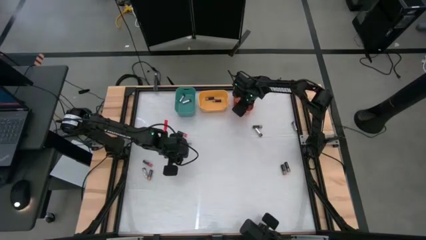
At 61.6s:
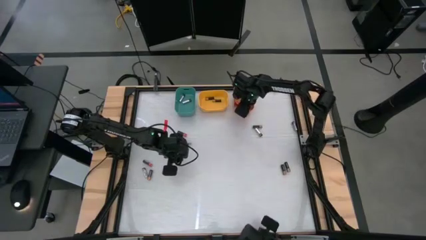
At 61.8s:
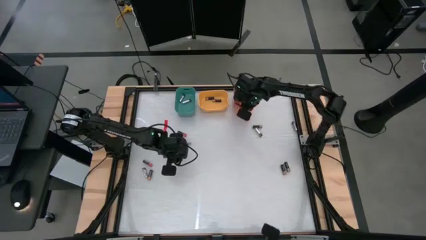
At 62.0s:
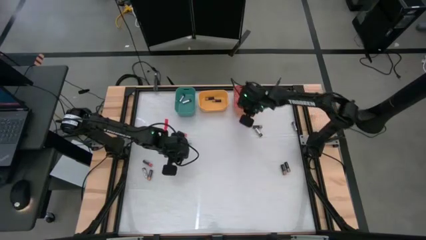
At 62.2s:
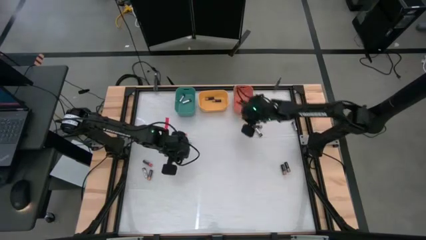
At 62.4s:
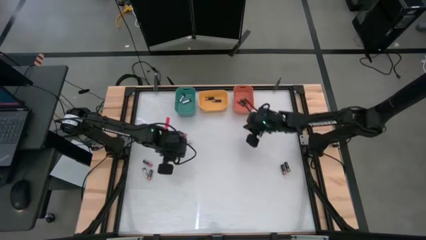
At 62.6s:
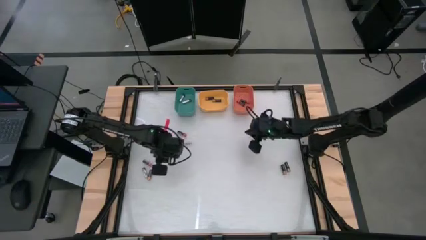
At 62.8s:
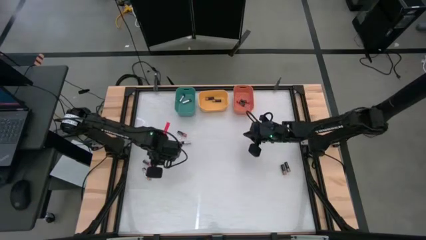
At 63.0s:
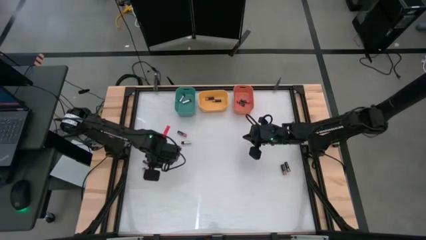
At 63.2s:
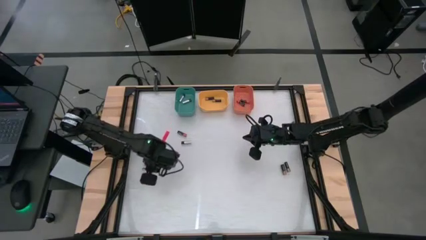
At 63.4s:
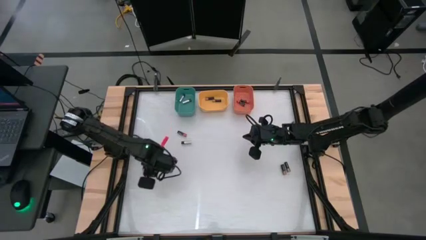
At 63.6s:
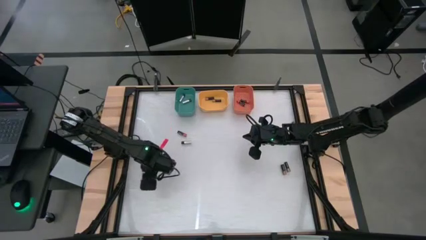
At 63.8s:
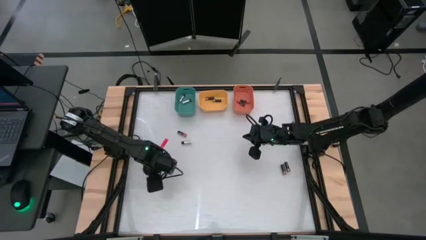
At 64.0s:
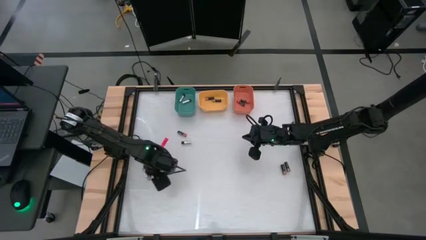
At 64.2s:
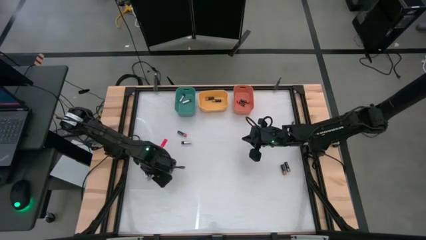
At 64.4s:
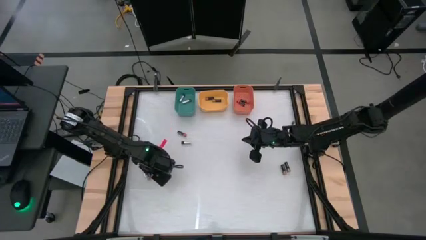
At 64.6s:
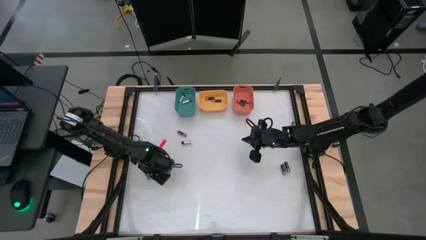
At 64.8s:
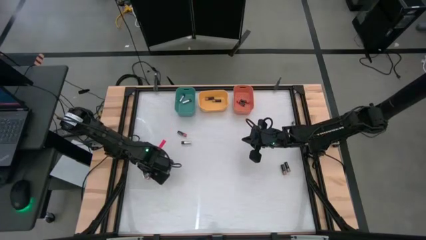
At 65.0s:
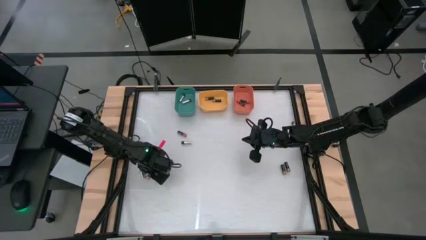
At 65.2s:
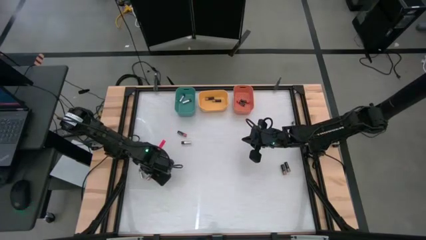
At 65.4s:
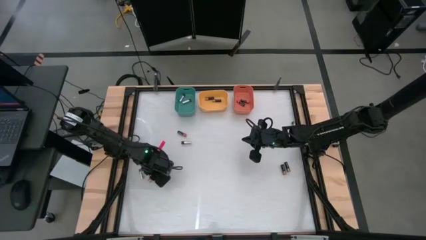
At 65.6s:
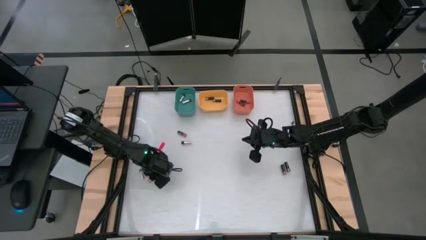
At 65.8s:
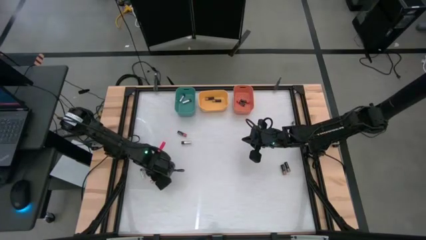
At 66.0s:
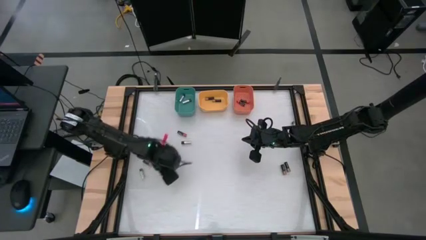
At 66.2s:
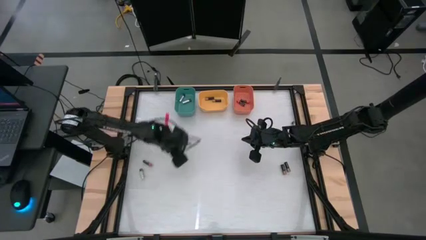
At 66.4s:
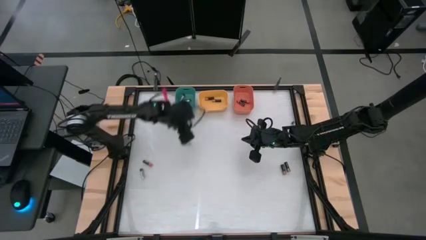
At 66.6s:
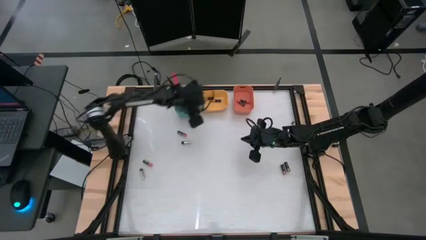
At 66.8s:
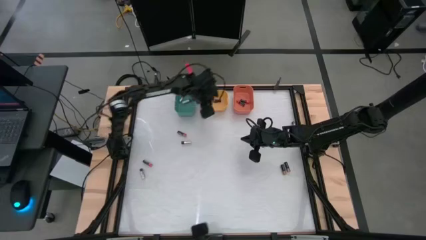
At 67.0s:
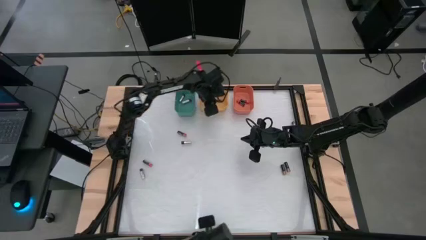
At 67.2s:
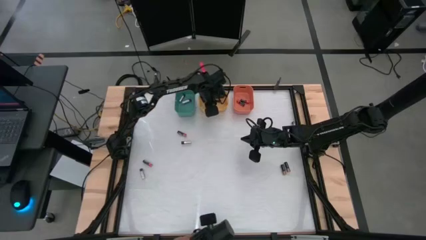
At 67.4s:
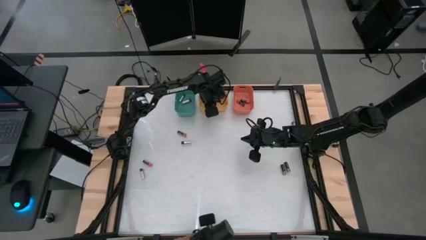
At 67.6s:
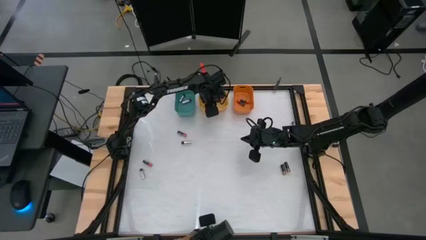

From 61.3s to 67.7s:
Task: Sort batteries
Put the brown battery into the yellow bin

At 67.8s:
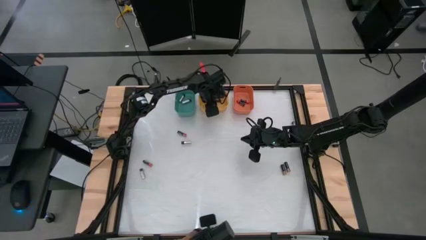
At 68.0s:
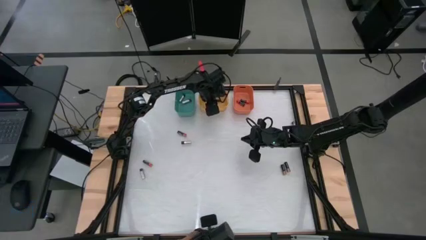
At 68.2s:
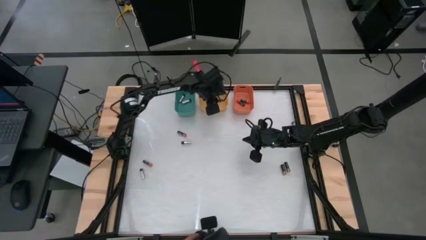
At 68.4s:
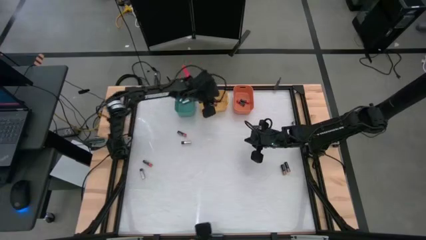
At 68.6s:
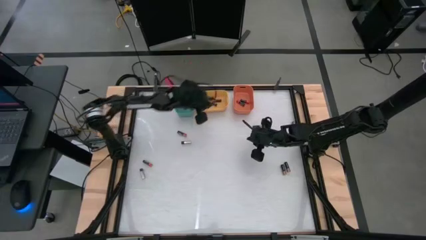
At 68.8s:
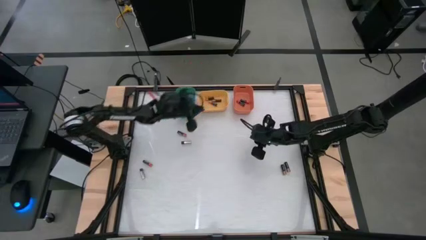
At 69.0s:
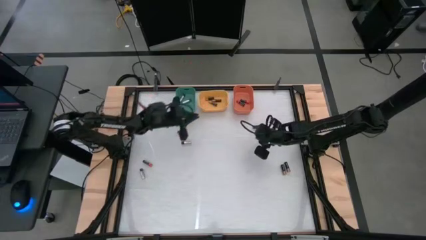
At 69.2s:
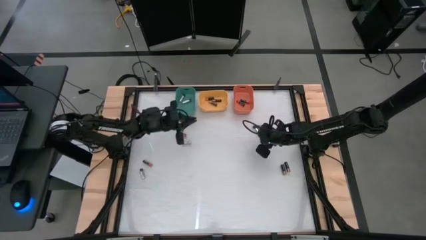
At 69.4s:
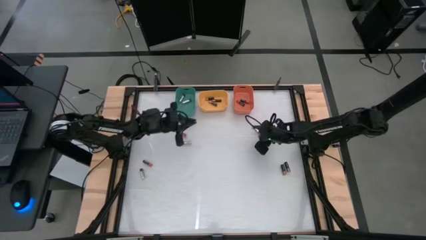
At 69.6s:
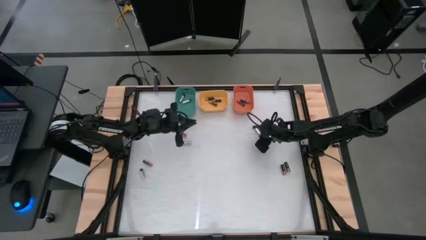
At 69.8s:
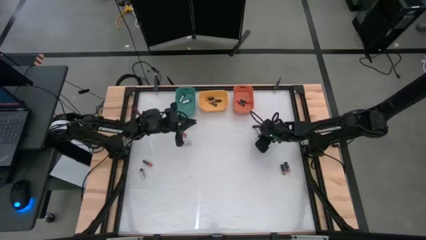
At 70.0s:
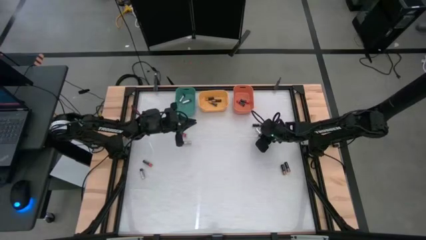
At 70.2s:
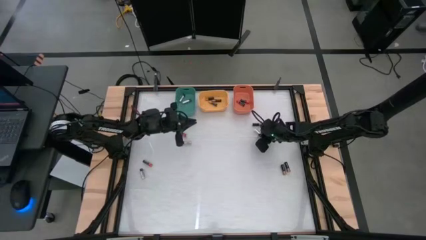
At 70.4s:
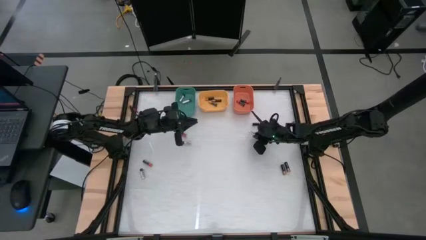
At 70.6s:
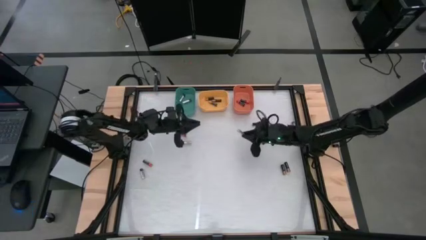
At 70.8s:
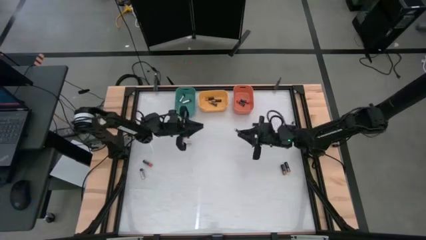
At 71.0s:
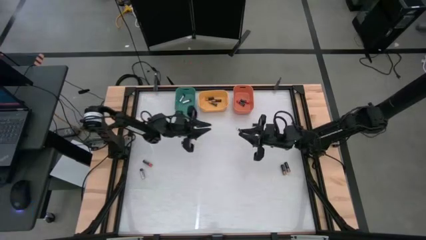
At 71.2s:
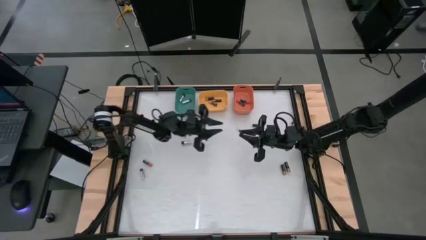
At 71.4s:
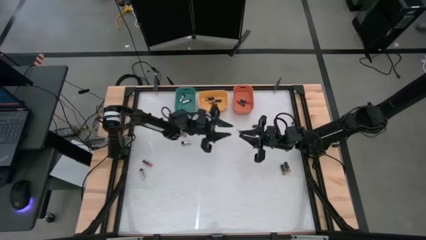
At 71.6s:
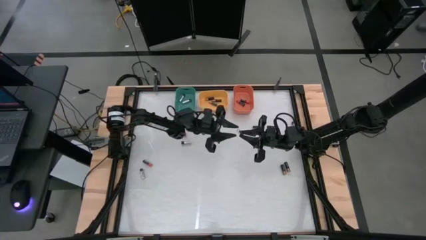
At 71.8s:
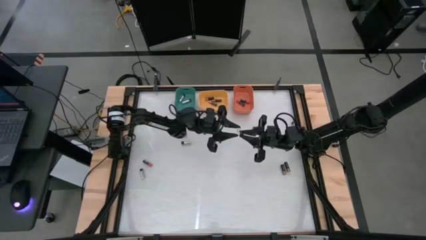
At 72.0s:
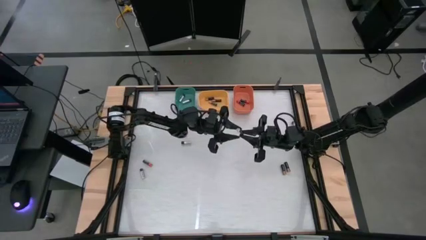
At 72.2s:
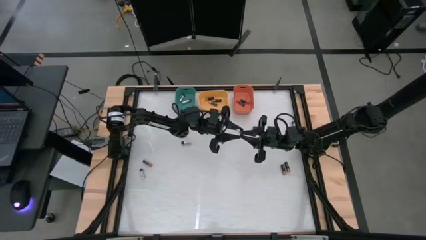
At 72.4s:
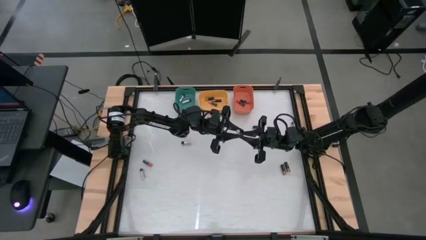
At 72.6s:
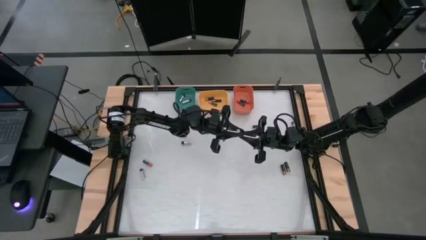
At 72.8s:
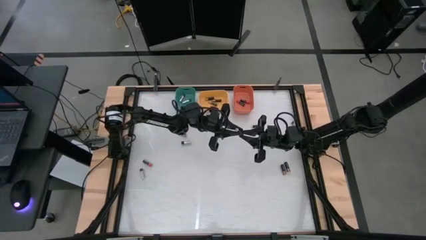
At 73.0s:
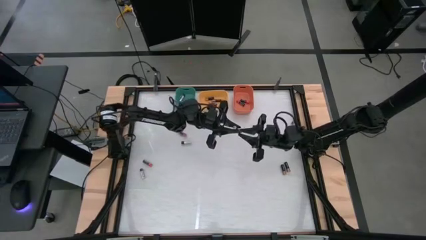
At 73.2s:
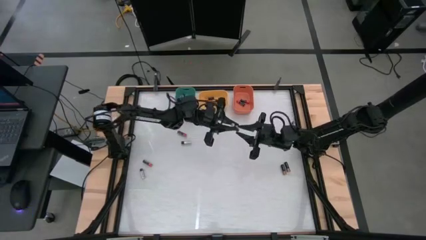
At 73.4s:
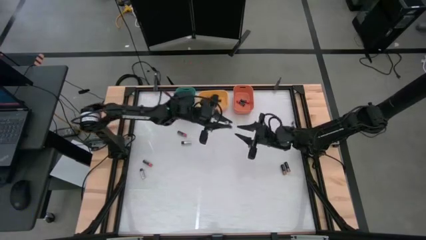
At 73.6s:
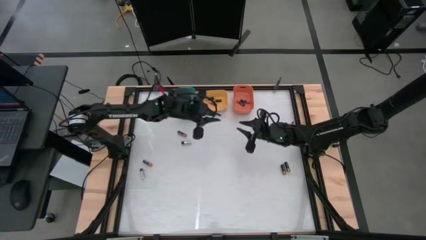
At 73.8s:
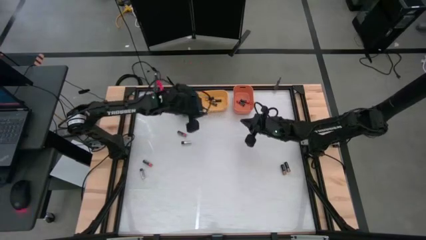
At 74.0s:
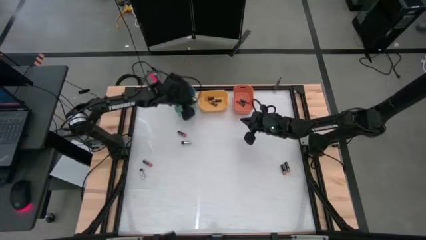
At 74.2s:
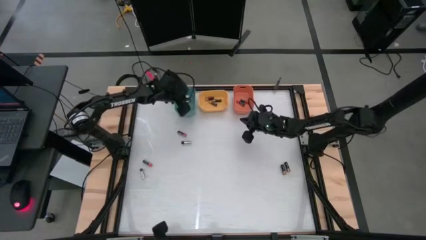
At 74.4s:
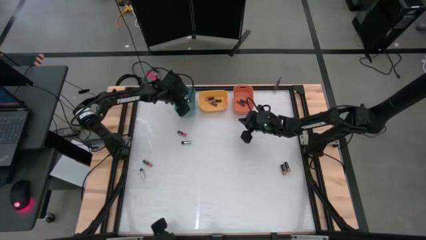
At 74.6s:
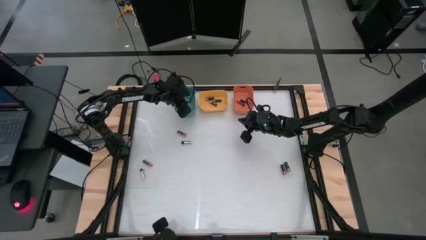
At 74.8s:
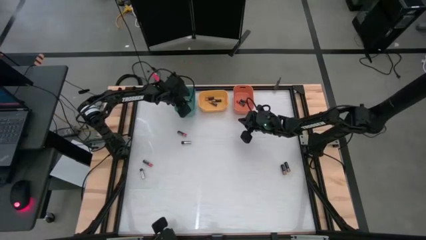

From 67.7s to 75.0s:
Put the silver battery into the green bin

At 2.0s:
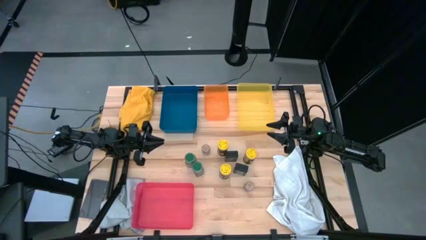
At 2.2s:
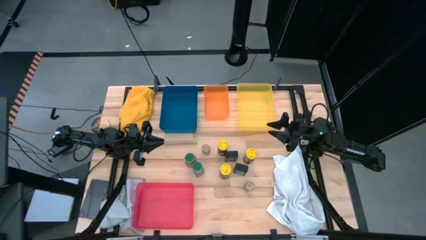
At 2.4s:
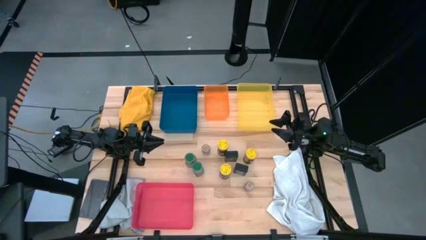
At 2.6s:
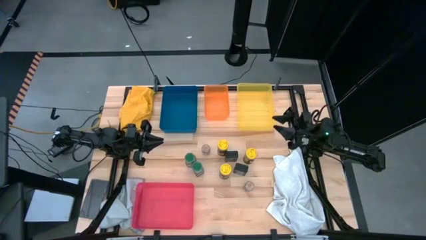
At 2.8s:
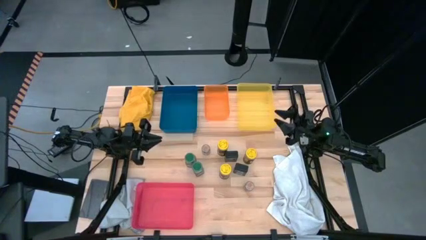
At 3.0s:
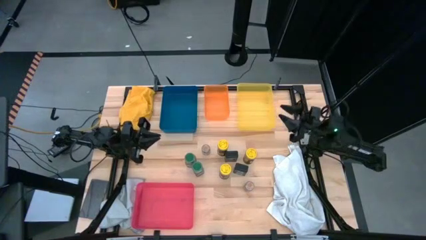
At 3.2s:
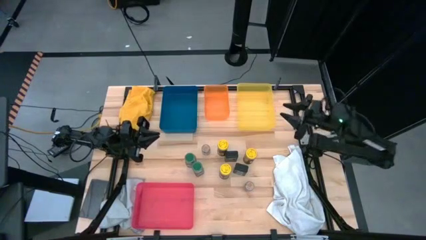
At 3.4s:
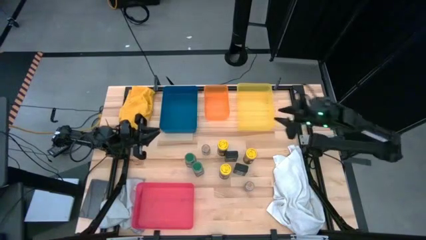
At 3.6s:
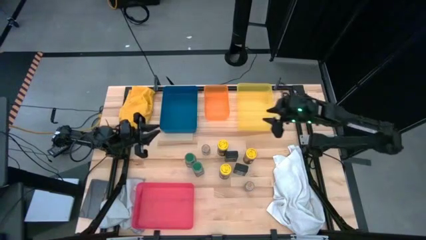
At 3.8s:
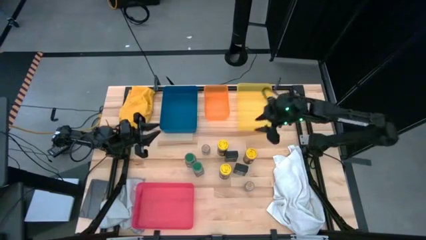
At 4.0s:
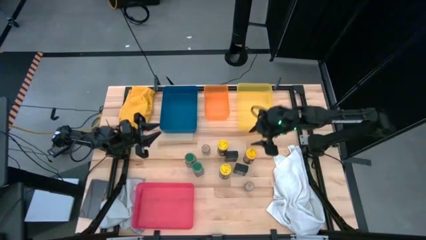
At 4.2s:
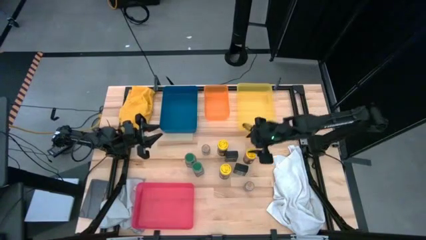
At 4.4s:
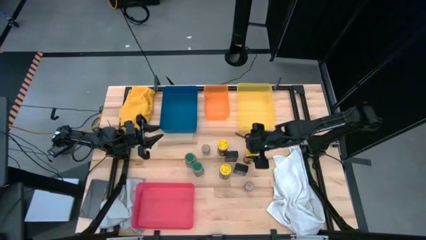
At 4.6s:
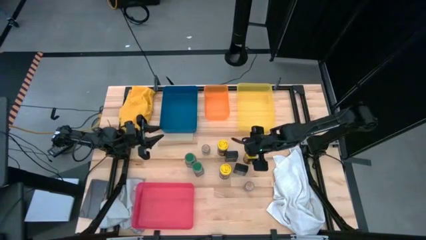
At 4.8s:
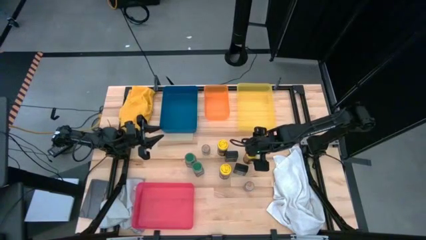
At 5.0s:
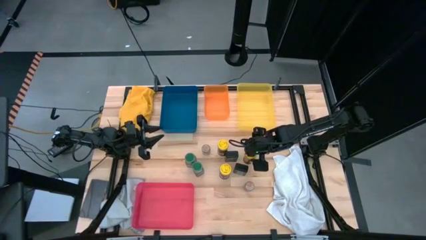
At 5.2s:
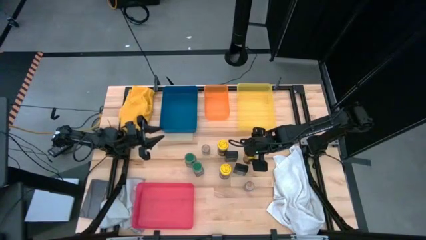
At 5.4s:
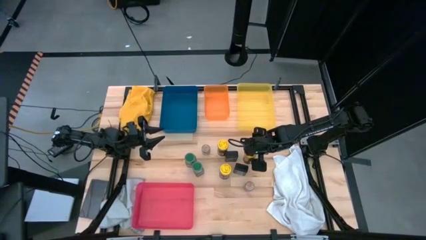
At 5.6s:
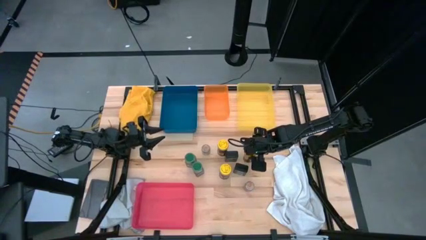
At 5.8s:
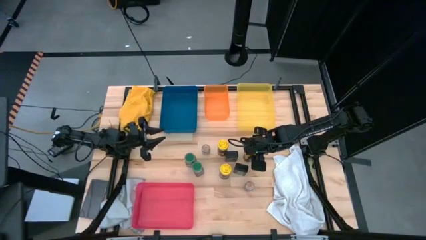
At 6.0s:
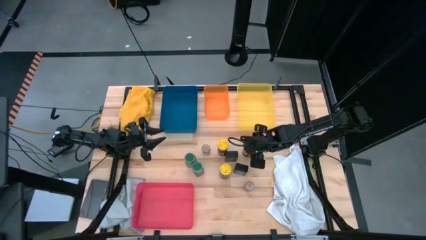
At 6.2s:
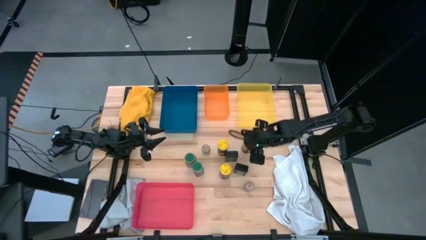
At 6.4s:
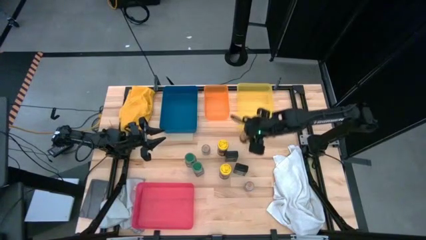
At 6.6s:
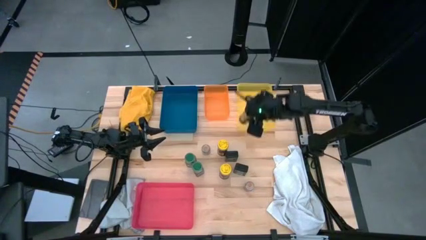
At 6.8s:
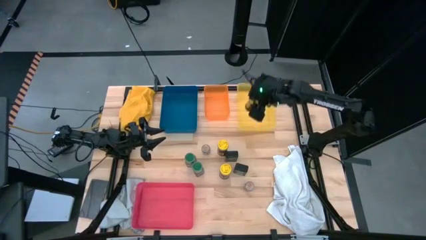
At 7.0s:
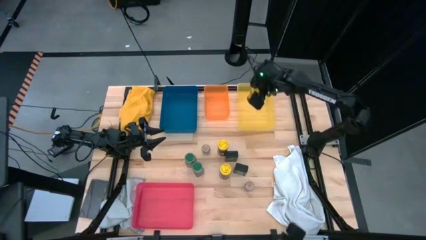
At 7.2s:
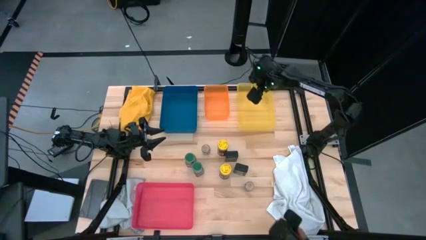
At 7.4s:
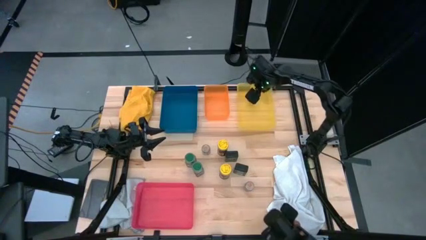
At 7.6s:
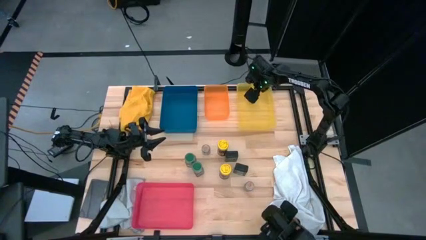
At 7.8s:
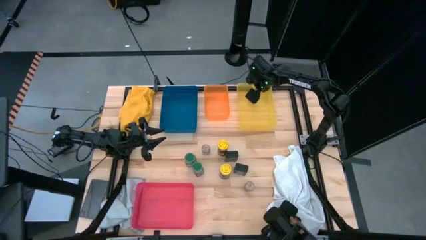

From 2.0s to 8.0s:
Task: Sort spices by type
Put the middle yellow seasoning bottle into the yellow bin
